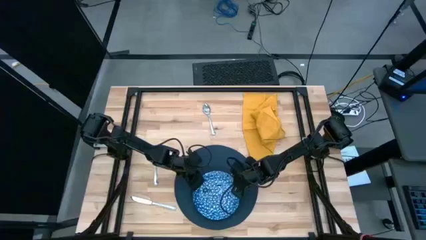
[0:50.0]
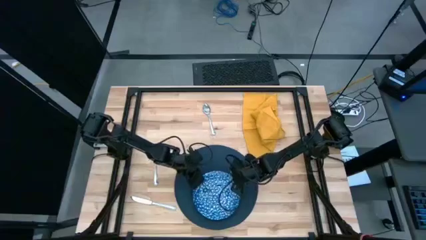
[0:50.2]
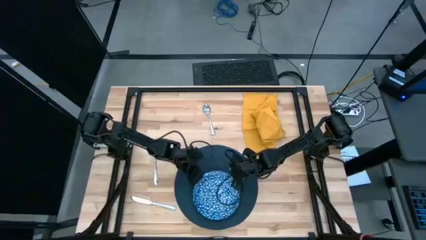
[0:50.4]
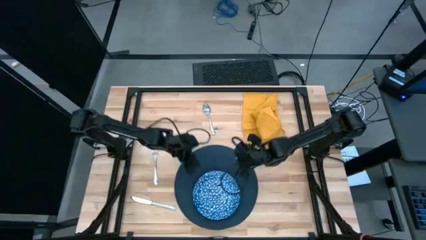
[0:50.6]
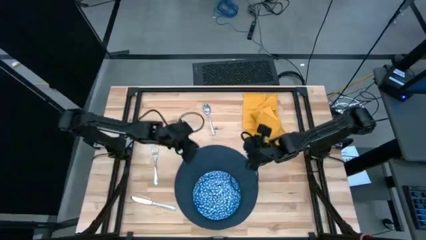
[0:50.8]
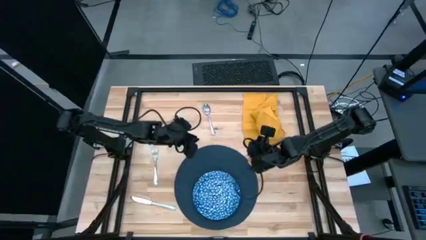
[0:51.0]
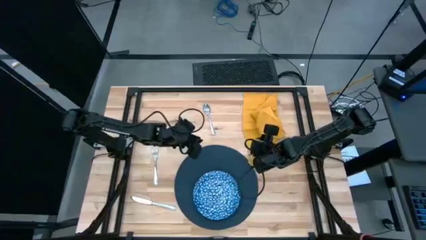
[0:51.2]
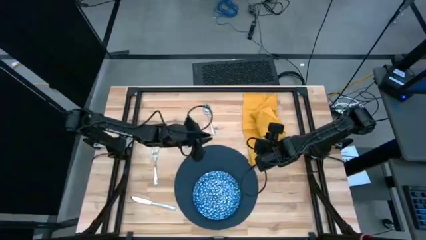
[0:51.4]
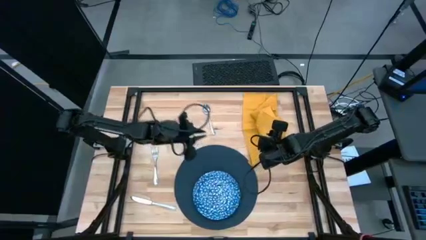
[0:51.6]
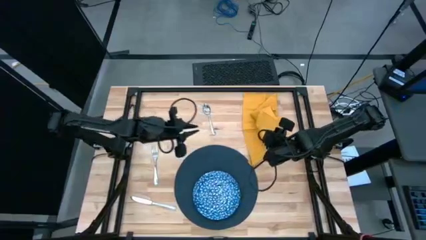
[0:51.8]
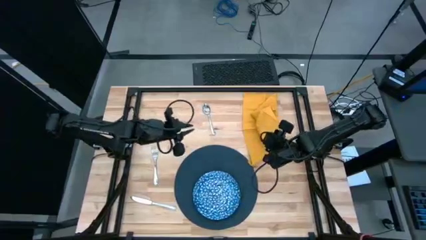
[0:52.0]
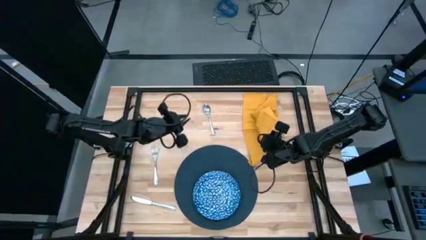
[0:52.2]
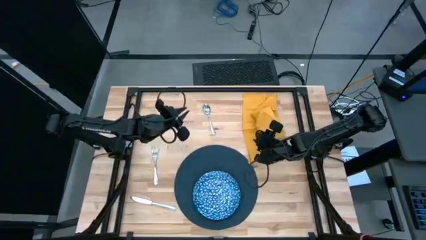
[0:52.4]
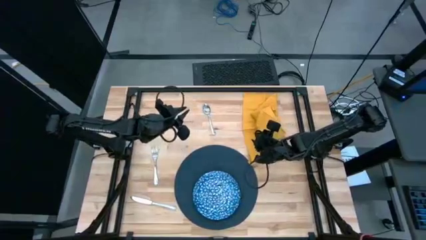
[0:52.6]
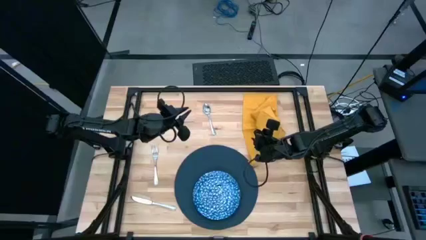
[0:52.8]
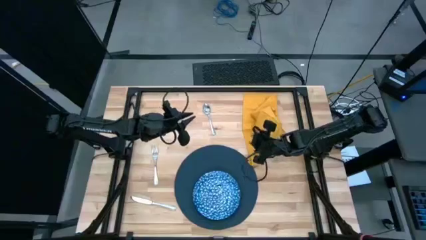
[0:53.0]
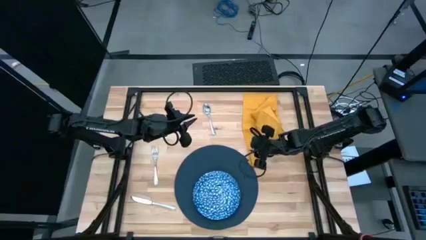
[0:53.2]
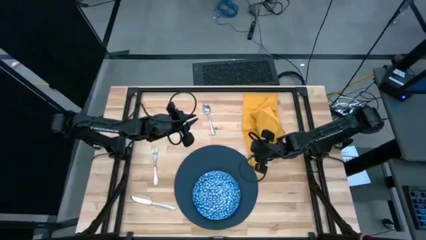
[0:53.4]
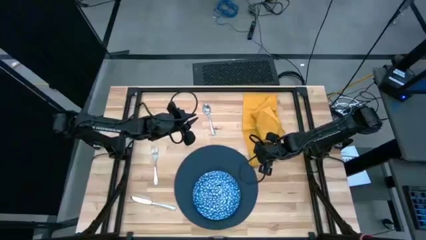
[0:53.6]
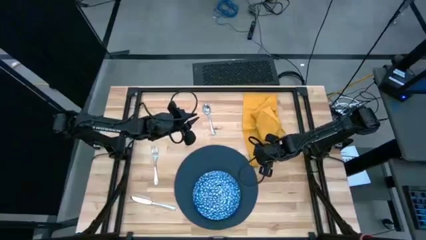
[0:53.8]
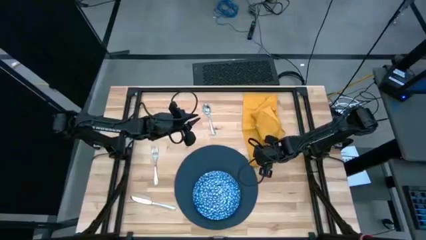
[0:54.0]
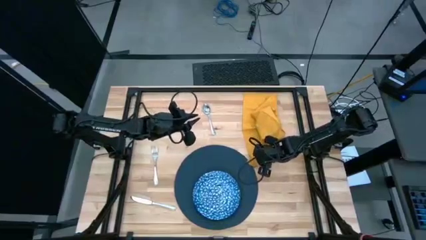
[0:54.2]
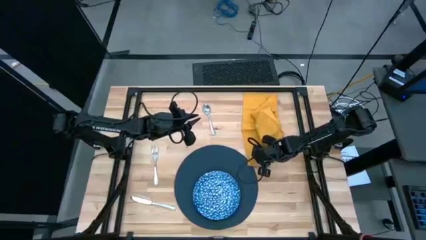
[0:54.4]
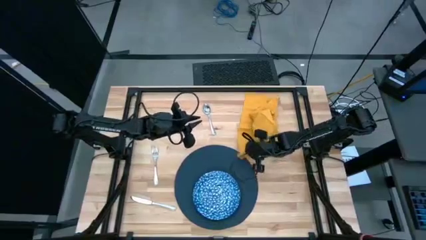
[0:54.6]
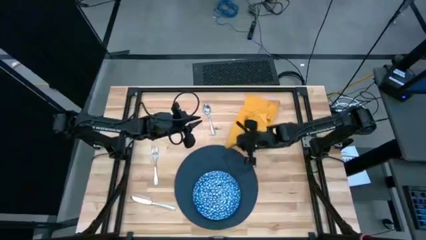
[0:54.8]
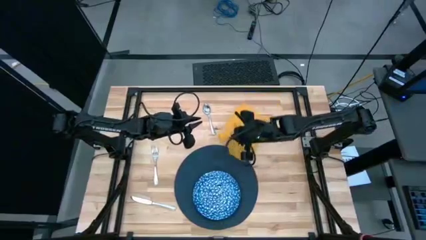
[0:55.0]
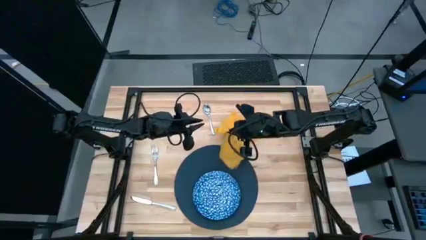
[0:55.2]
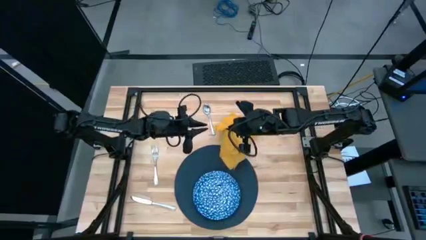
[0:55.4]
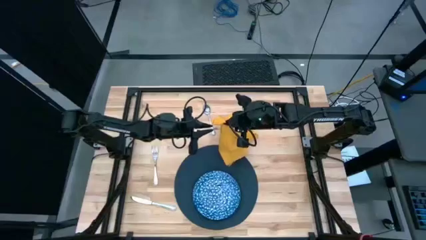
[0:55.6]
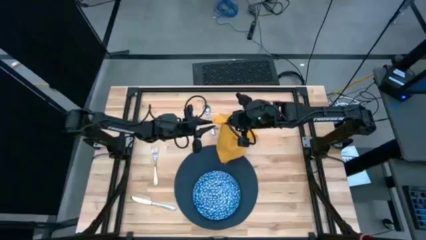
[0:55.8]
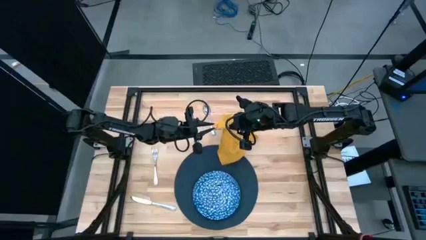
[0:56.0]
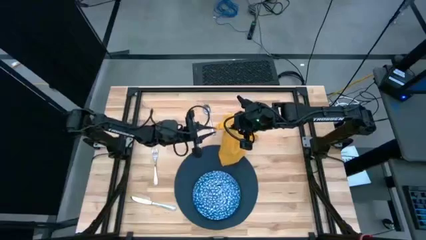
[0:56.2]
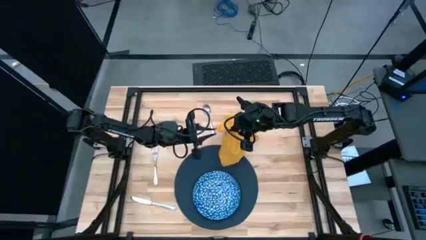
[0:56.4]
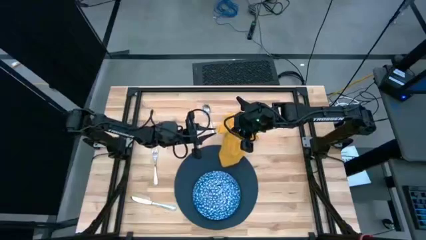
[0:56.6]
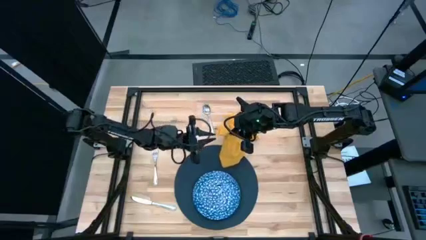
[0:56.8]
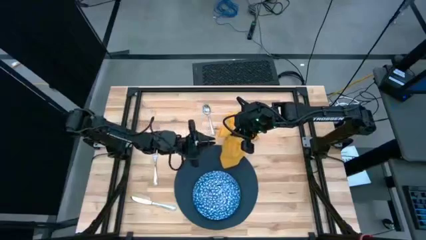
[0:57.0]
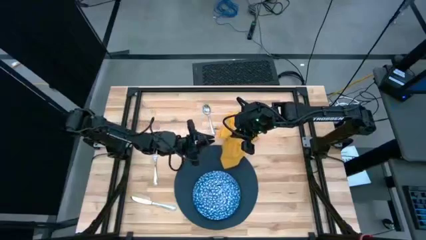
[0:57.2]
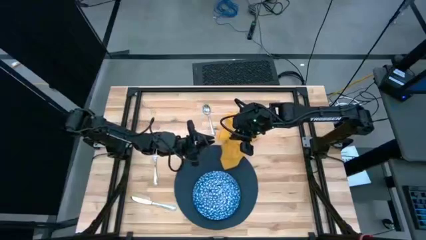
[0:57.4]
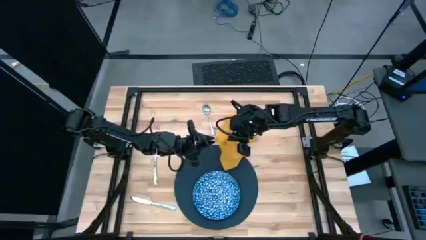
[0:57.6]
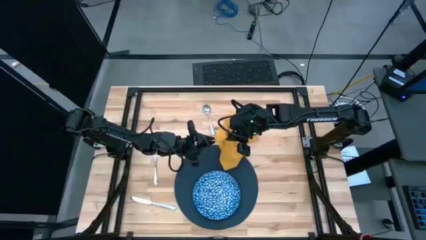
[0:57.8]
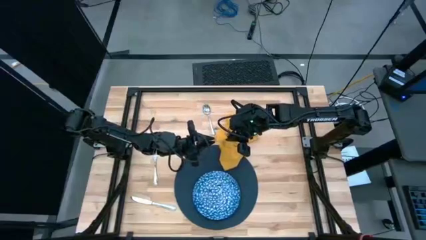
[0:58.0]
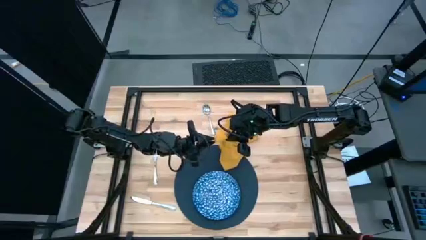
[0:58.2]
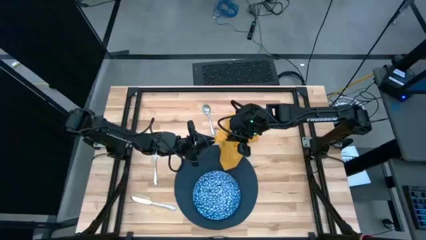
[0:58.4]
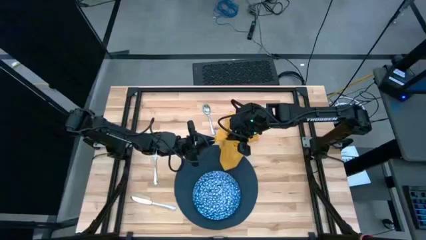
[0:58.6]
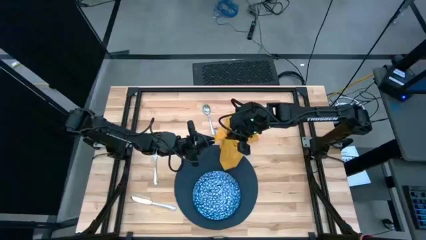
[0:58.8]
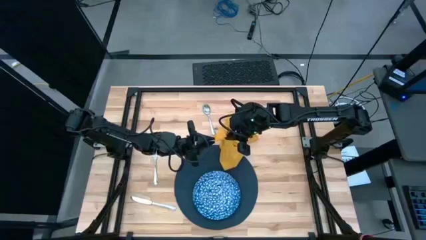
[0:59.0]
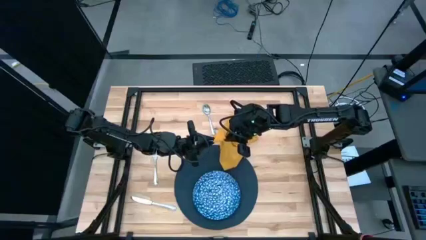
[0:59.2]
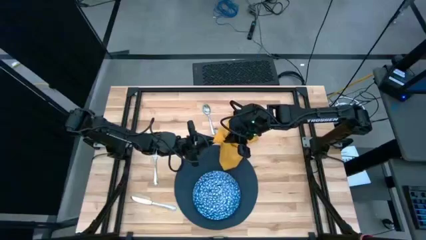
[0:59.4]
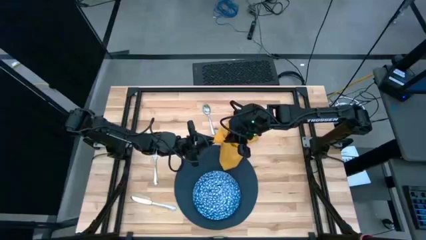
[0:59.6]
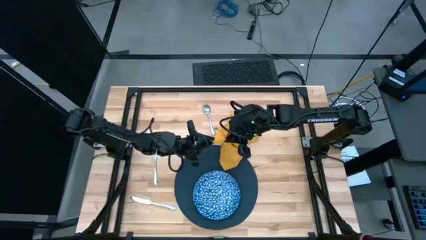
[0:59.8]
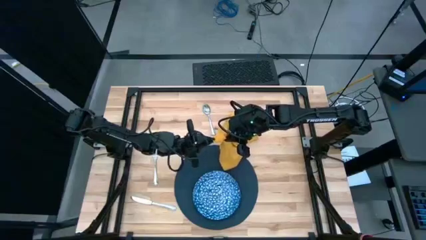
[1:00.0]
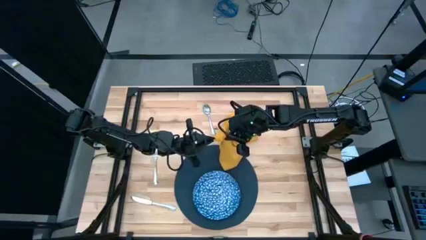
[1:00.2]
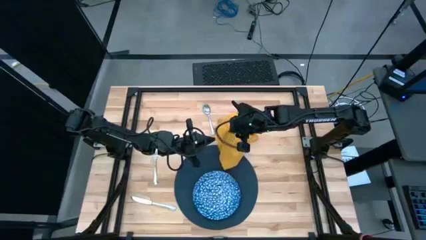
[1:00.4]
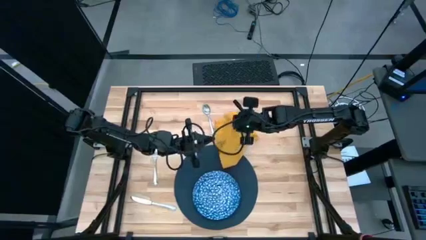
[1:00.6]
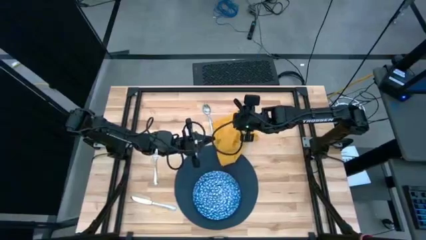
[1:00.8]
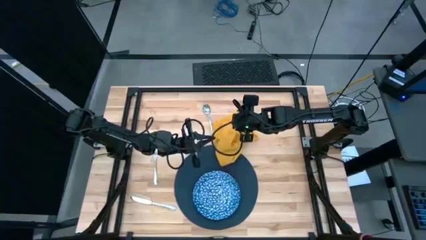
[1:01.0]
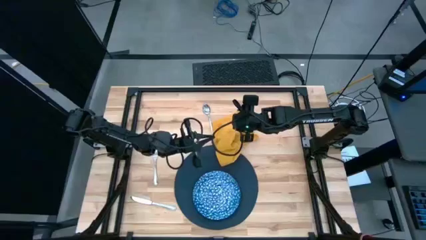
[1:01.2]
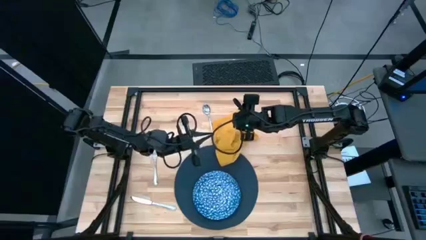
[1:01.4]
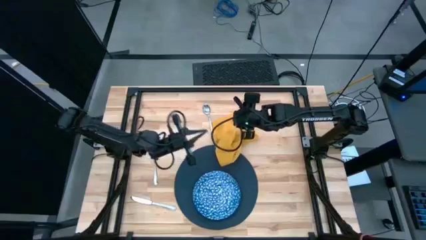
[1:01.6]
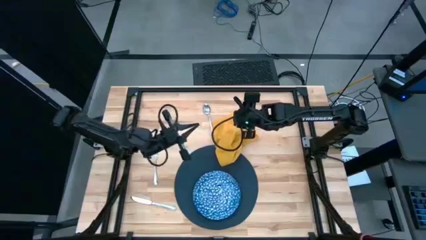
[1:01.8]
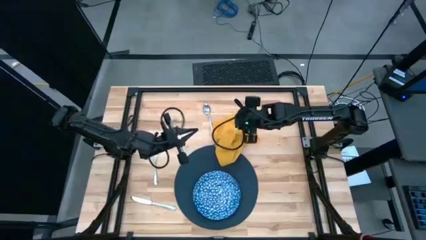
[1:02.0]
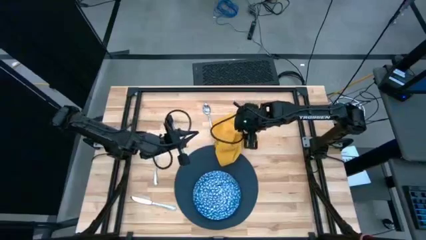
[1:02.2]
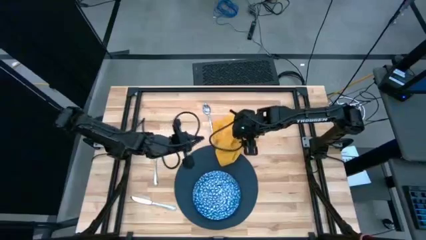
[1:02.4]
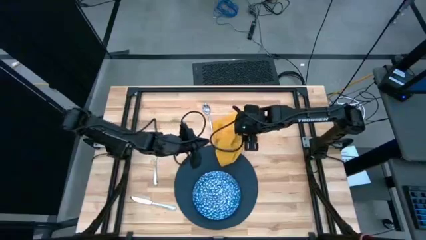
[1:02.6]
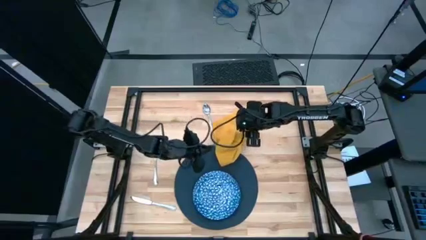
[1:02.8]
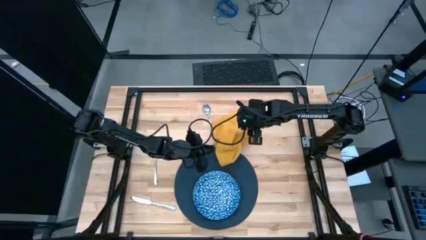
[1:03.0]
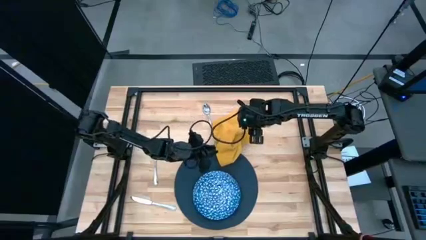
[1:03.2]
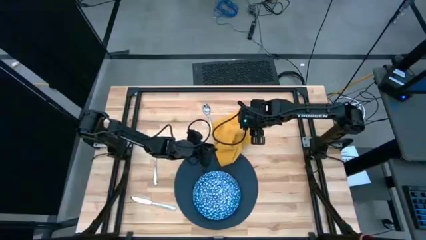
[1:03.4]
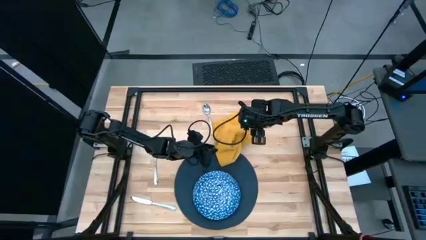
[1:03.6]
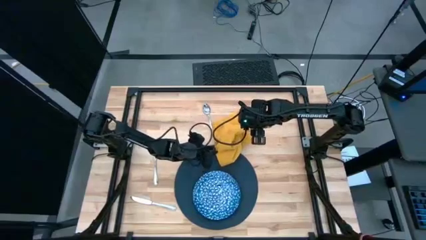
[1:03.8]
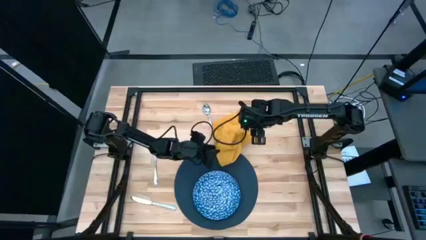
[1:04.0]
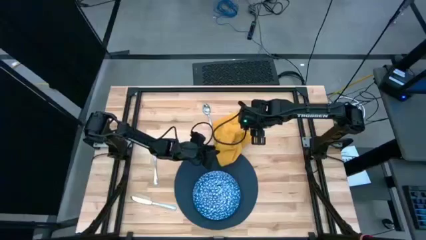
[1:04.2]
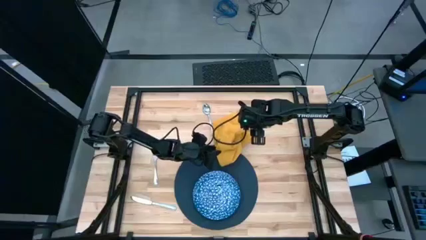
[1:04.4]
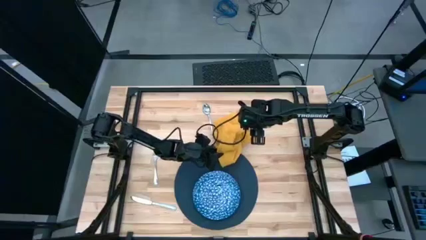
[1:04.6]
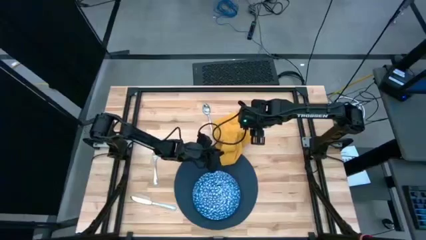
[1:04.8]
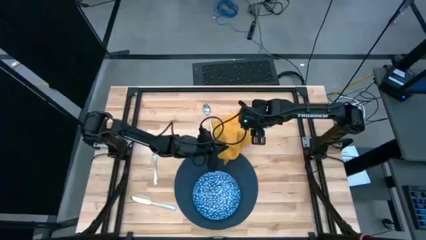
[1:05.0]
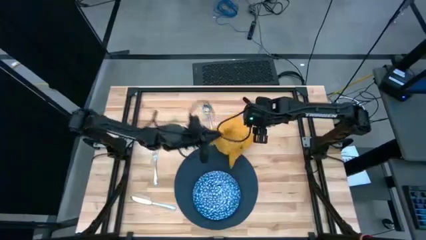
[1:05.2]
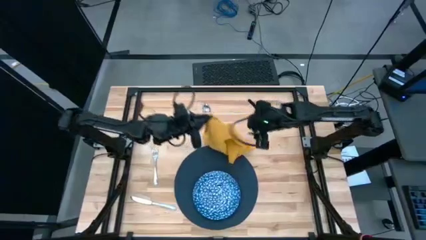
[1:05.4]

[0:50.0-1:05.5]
Task: Set table place
Fold the yellow table napkin
